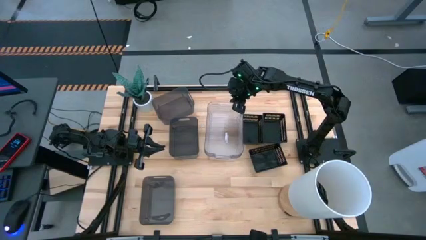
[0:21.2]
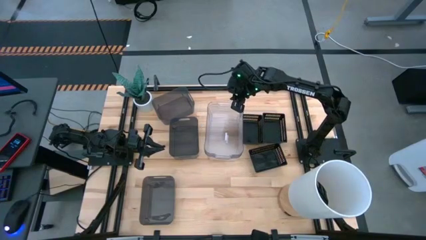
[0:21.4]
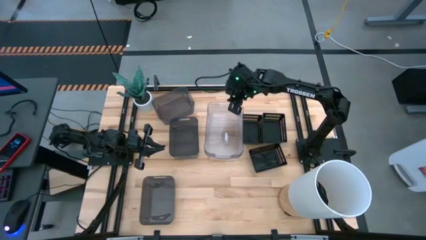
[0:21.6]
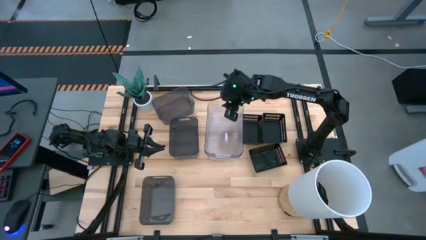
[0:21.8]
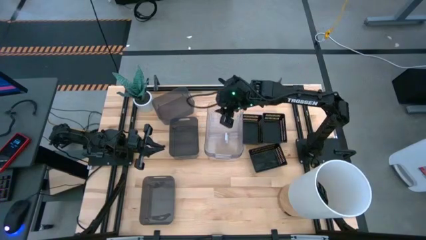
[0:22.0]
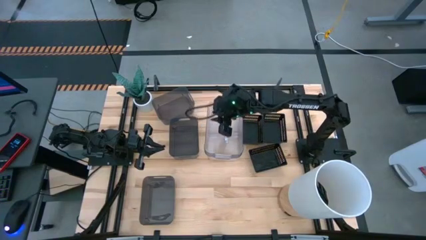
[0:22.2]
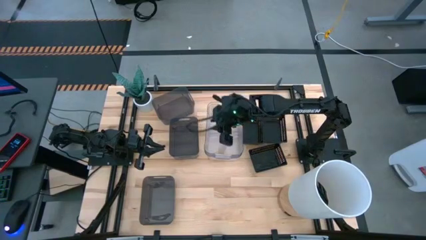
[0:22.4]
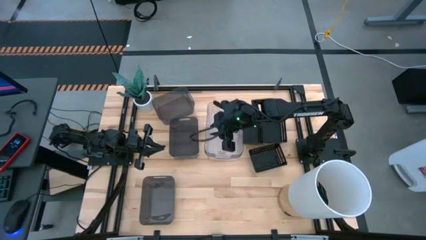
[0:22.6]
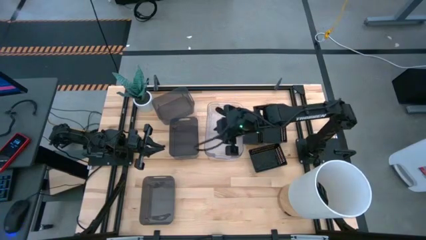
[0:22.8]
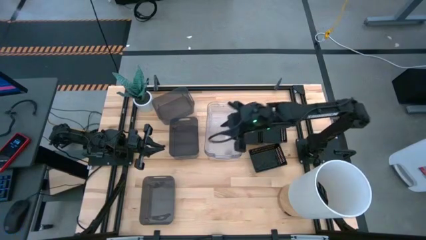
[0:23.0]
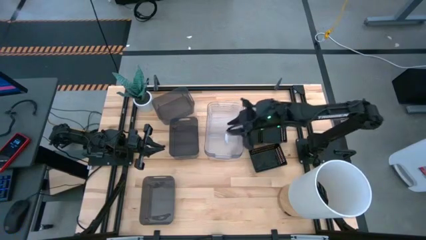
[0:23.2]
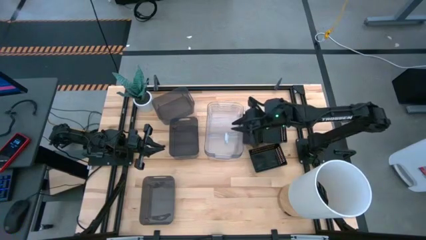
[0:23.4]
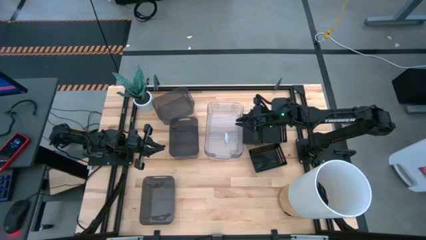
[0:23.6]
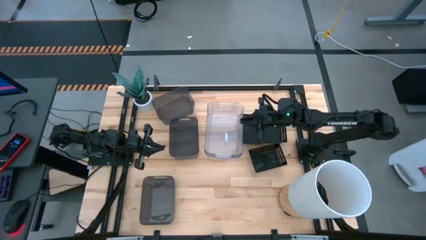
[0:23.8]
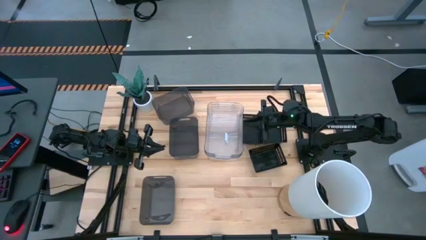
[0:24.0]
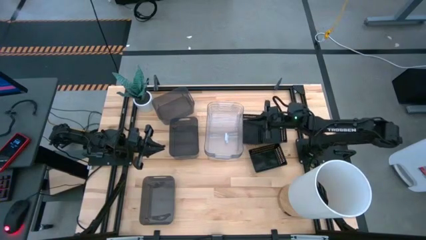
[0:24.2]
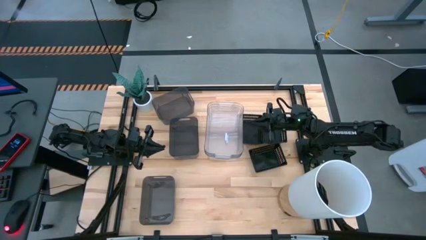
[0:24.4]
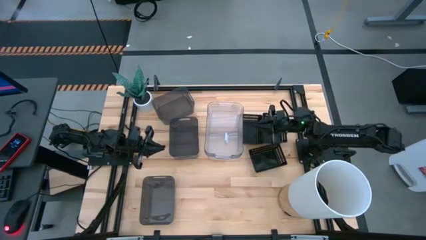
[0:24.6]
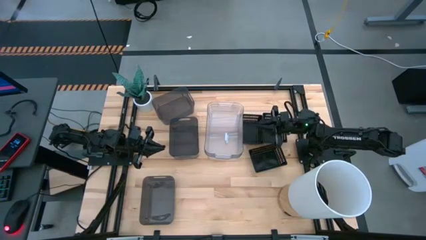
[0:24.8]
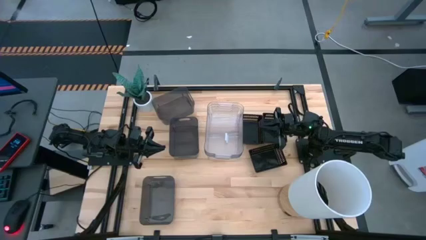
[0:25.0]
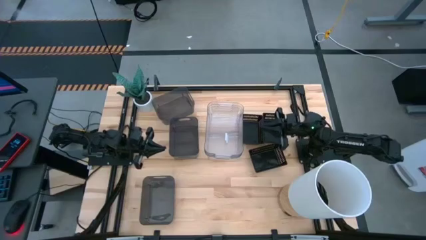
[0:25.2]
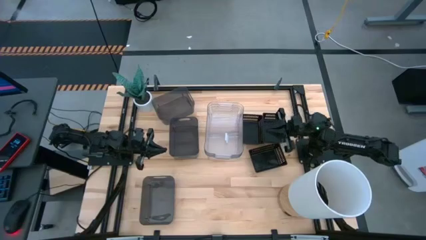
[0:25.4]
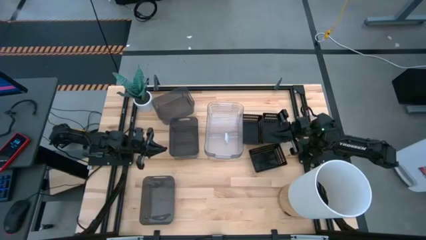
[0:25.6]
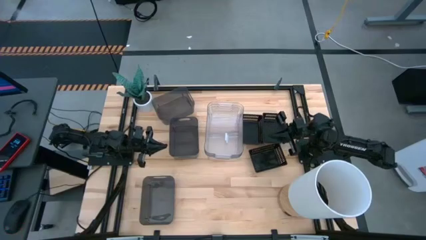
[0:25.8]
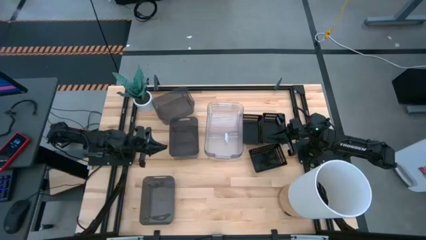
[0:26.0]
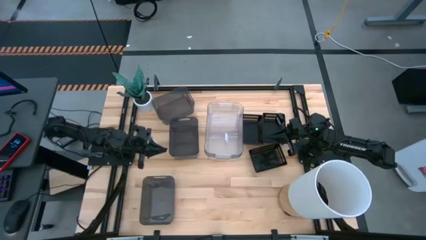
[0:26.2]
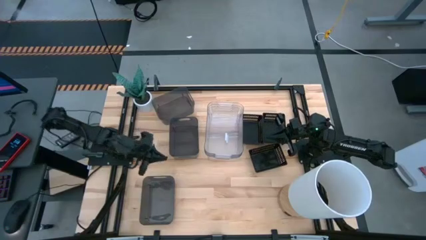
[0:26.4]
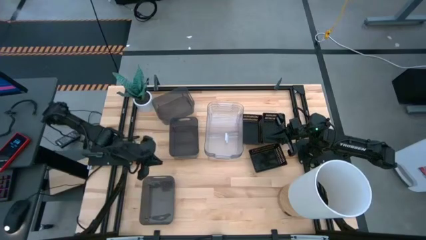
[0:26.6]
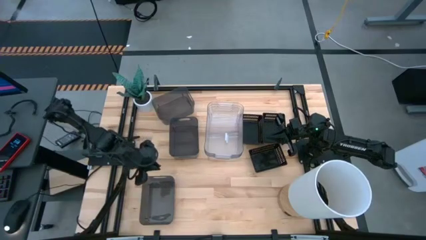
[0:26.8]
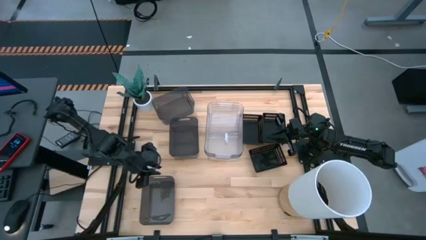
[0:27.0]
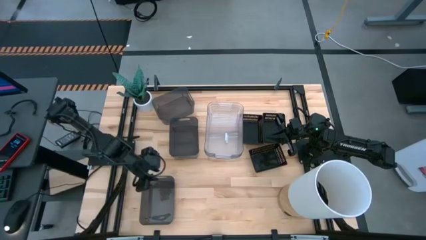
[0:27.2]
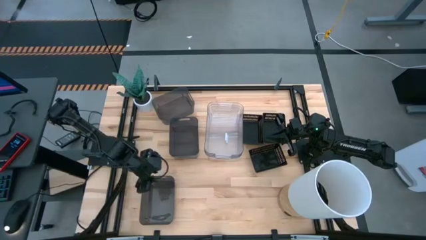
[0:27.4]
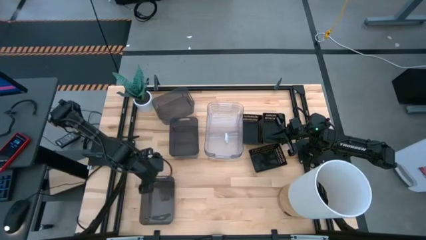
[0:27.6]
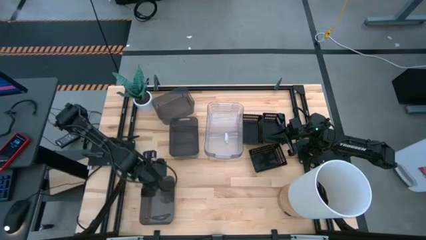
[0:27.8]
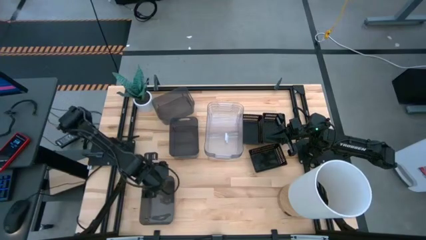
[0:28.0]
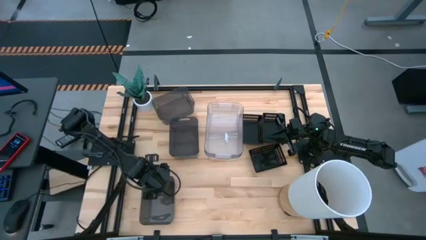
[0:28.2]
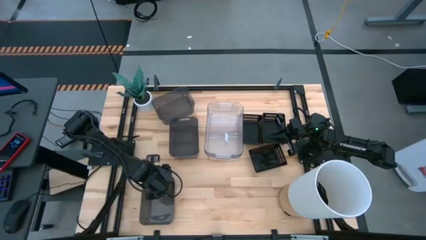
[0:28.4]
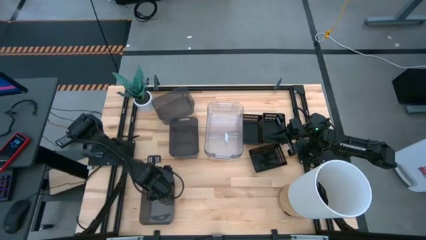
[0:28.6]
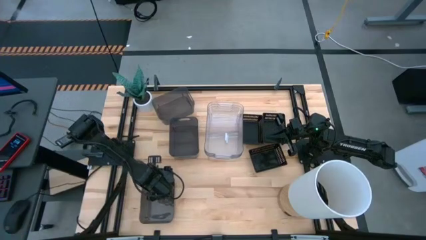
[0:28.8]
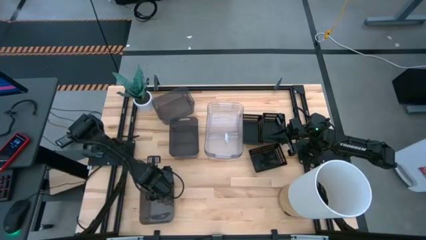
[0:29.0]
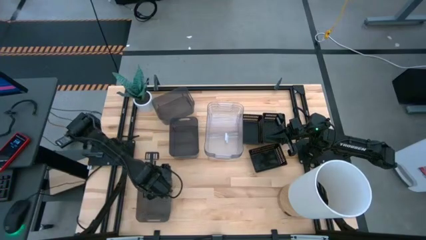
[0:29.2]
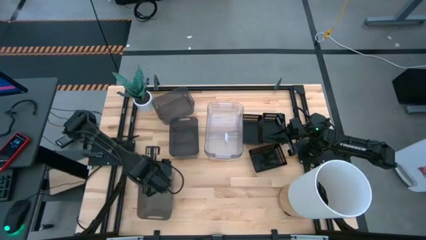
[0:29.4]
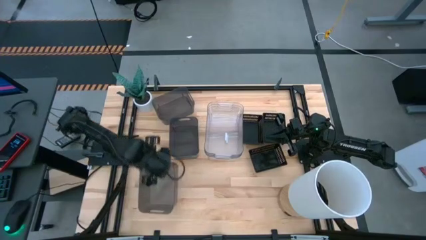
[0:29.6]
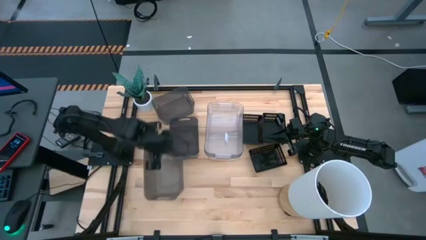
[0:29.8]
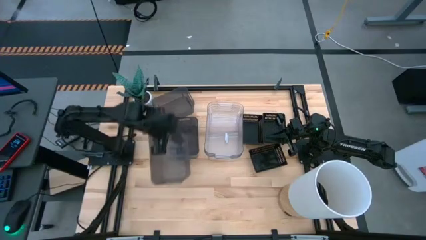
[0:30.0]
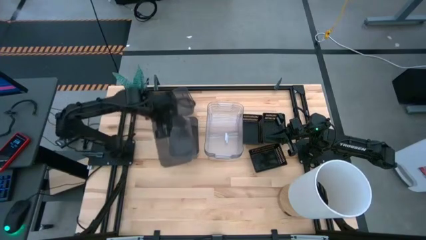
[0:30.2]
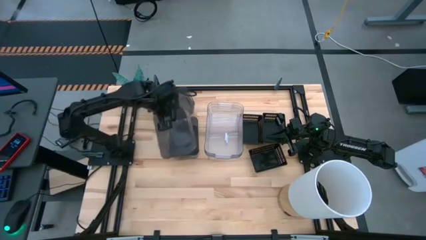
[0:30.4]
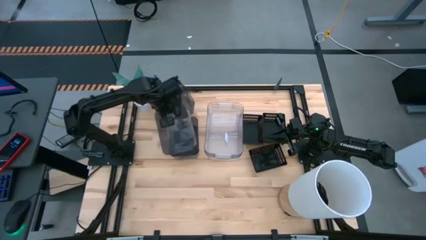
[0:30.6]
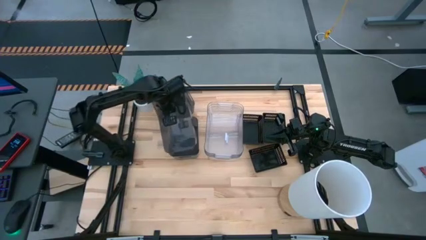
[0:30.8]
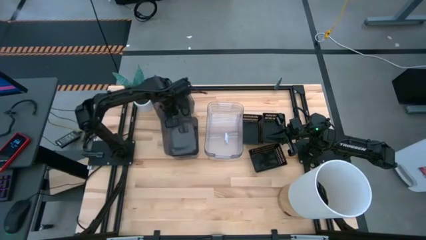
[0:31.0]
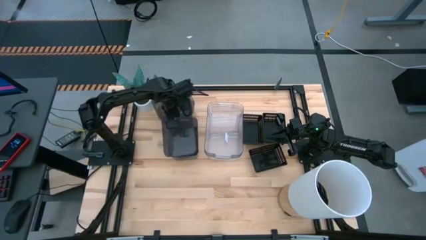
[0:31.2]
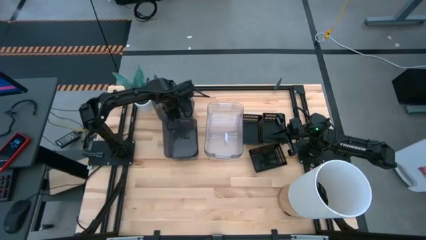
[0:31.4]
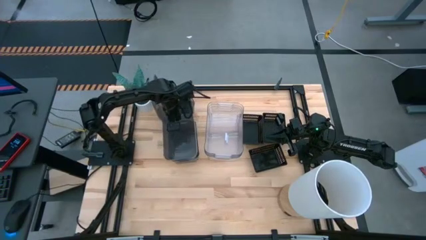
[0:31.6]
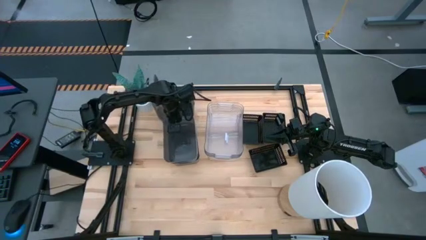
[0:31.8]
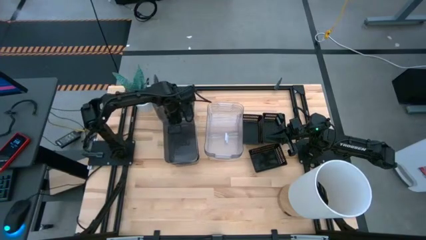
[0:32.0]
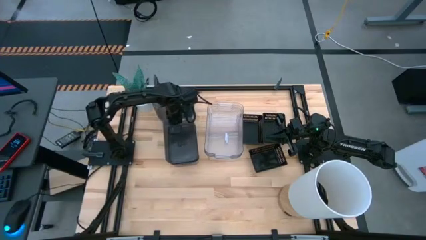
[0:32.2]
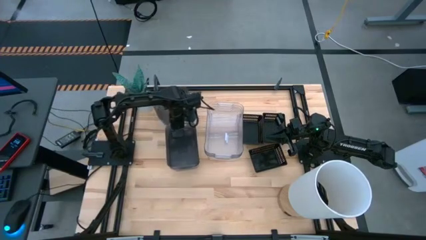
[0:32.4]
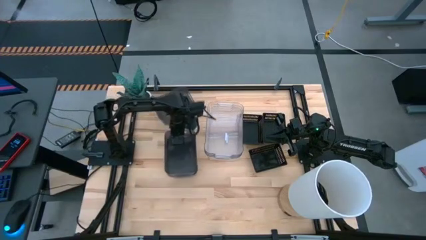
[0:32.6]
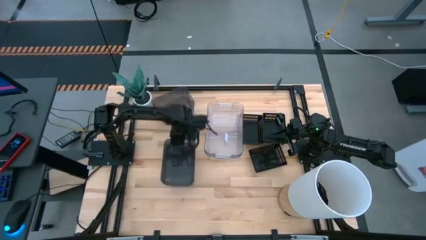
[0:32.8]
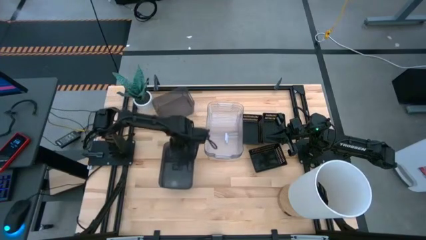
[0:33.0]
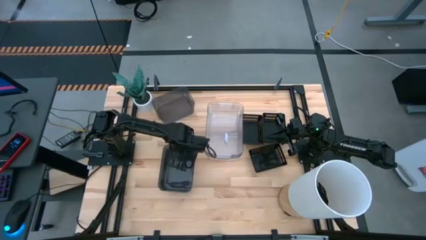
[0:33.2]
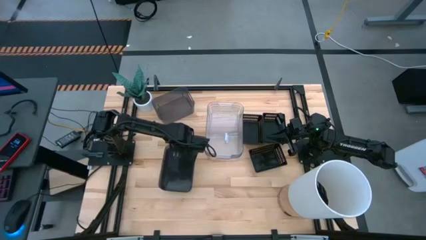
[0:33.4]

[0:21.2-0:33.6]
Stack the bottom black transparent bin on the bottom black transparent bin
